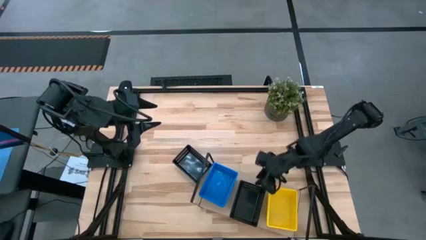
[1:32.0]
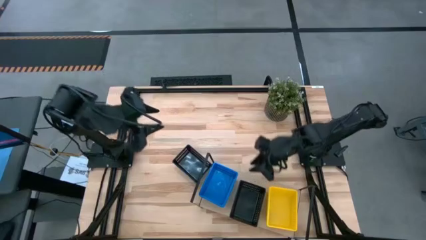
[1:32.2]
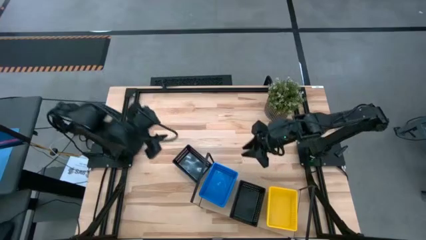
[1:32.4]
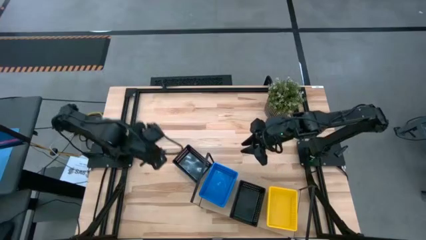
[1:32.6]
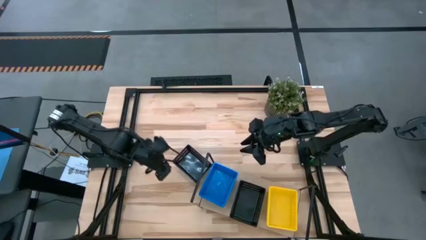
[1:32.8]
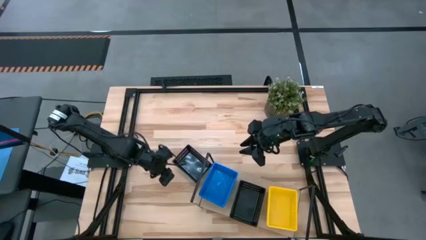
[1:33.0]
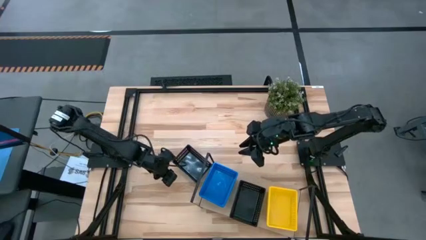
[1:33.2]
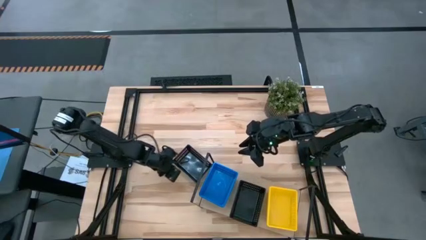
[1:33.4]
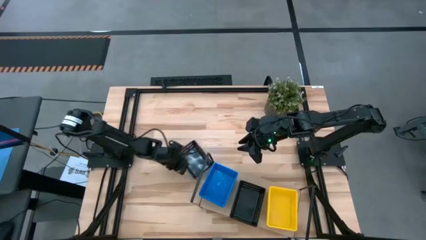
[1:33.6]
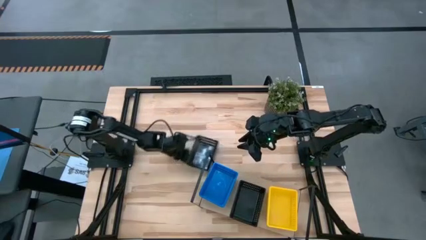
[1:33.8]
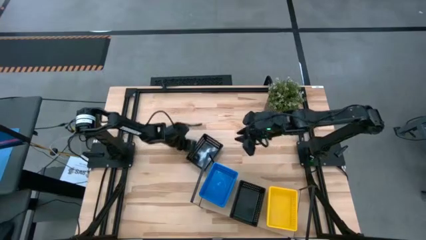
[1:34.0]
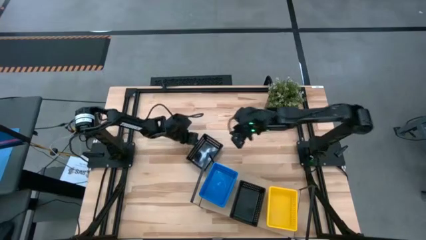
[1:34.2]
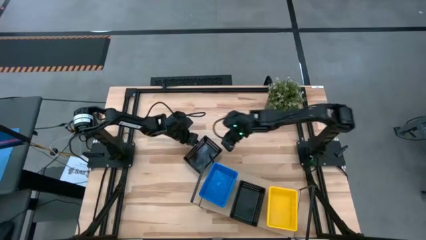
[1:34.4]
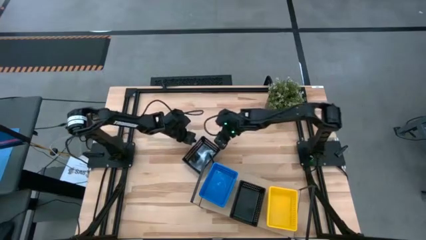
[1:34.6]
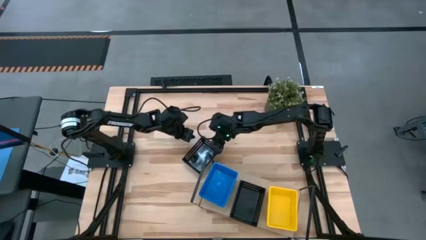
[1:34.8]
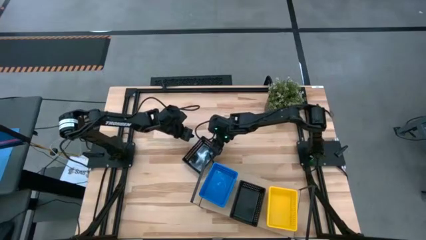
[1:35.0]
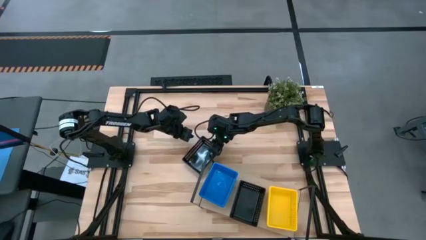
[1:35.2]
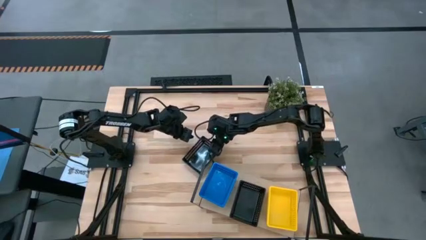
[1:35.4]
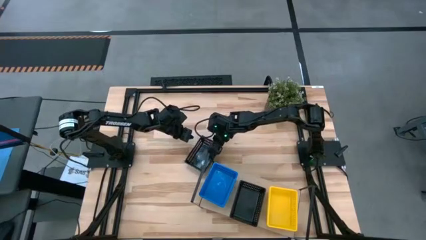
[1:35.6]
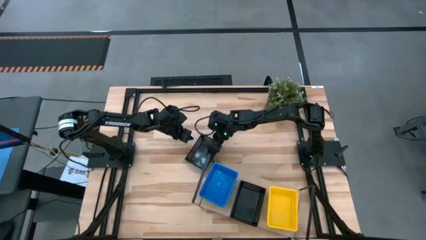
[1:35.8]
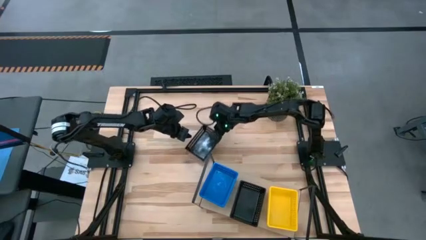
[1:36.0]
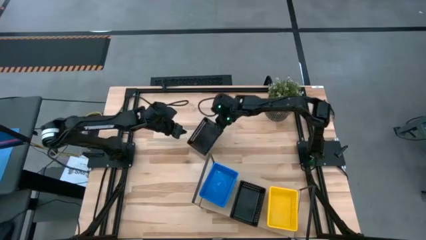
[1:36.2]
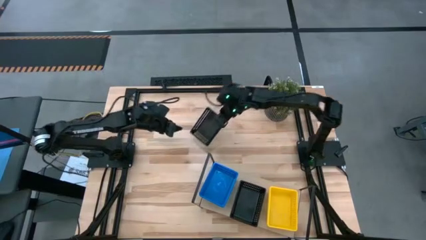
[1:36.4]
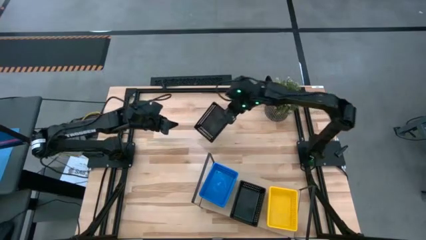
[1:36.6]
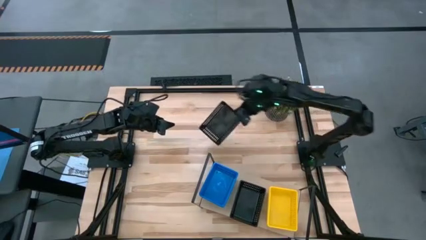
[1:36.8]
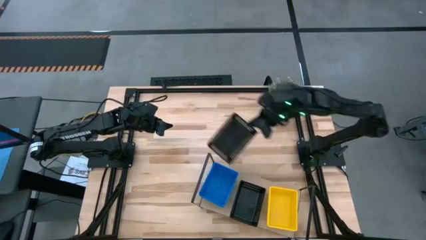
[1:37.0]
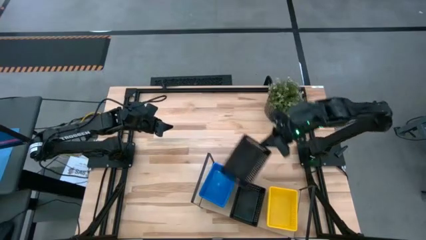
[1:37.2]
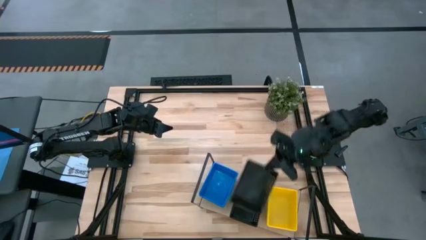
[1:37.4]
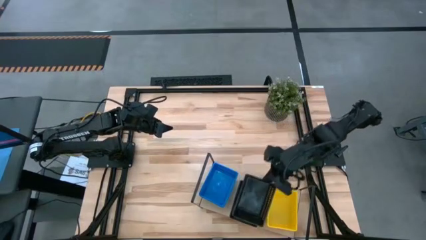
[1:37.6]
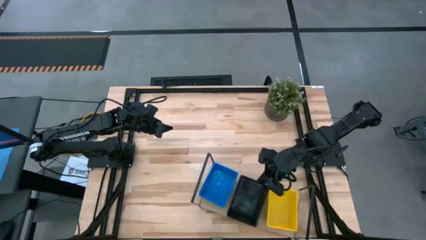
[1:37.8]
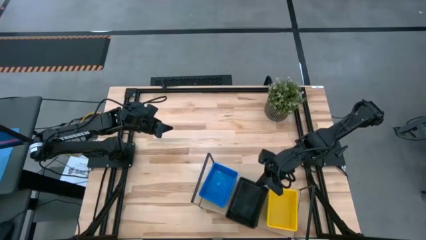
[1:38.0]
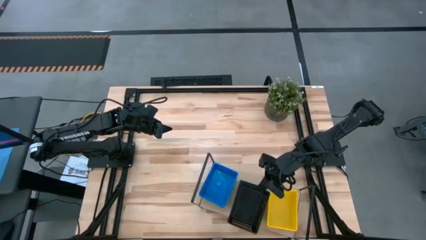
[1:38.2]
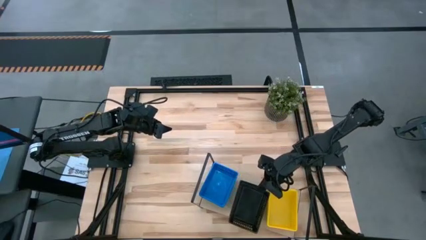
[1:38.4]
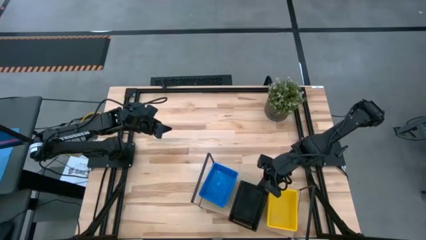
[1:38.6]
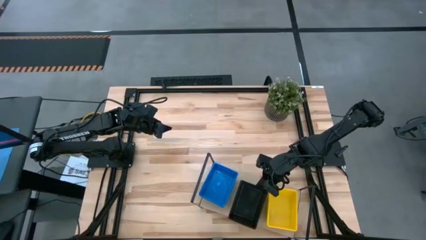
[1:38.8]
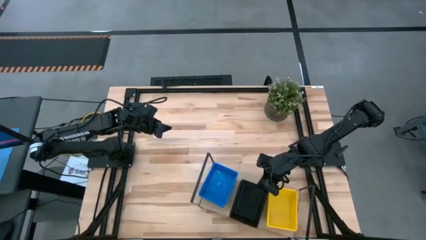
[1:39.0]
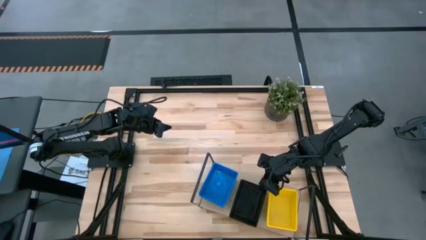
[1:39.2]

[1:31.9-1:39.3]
Task: Stack baskets on shelf by color
Stack the black bin on top of the black bin on the shelf

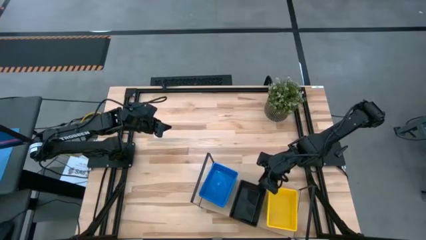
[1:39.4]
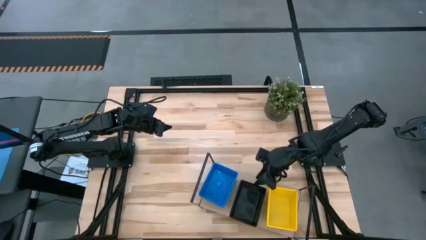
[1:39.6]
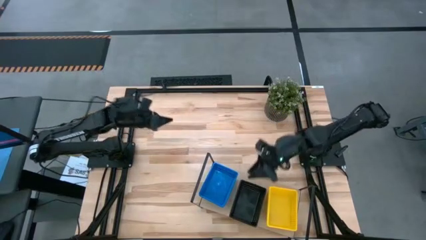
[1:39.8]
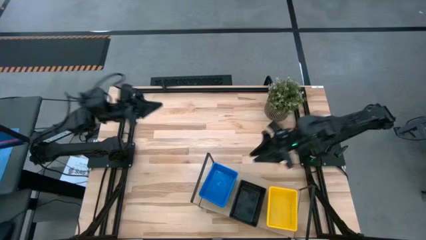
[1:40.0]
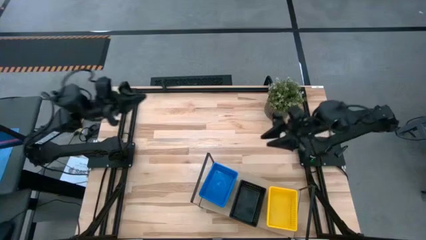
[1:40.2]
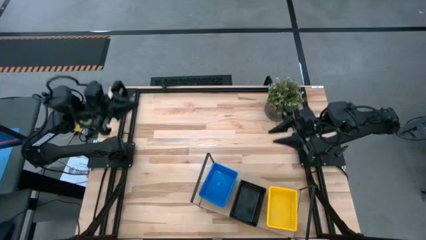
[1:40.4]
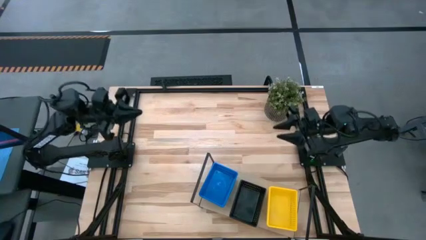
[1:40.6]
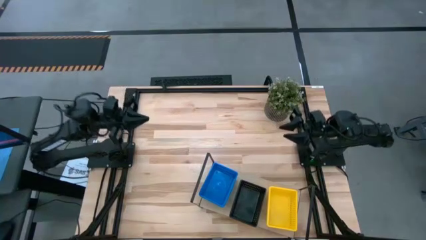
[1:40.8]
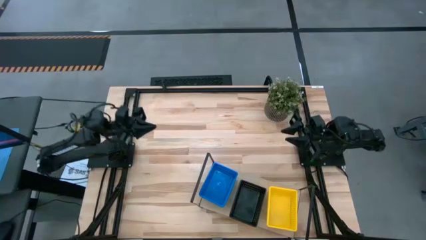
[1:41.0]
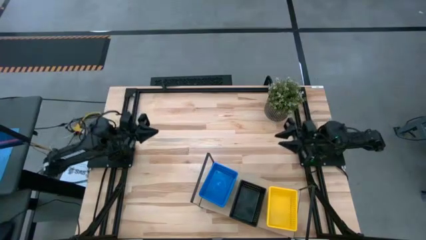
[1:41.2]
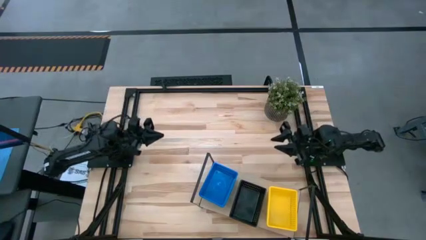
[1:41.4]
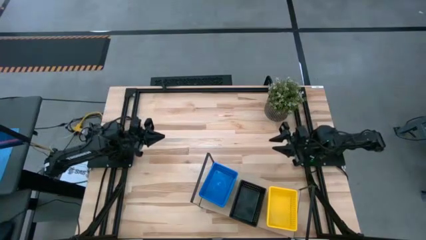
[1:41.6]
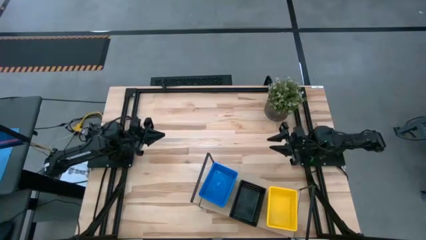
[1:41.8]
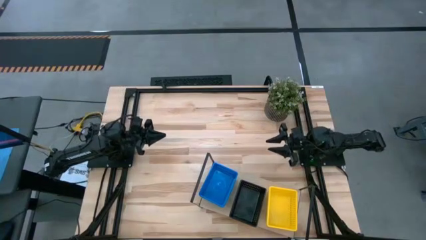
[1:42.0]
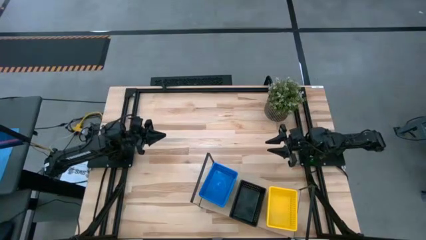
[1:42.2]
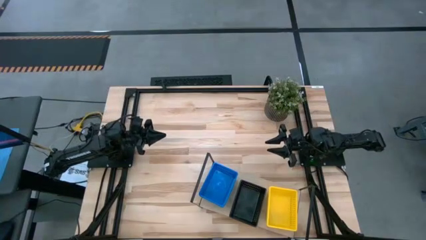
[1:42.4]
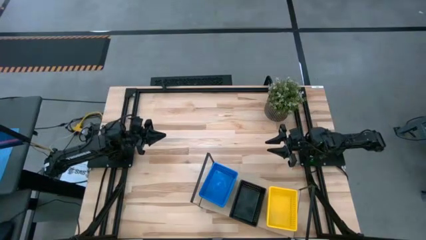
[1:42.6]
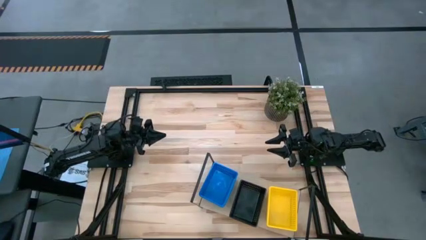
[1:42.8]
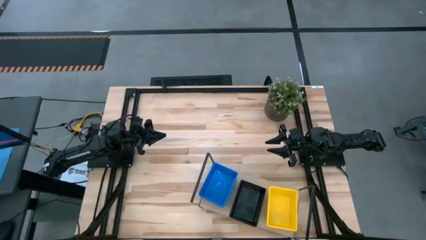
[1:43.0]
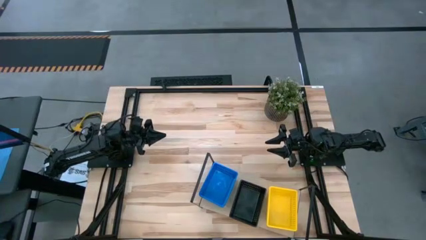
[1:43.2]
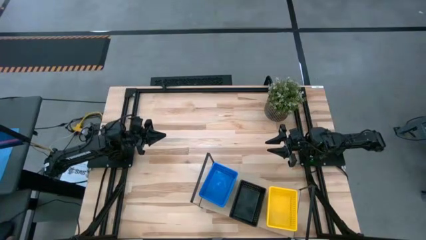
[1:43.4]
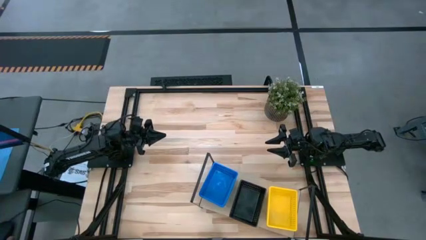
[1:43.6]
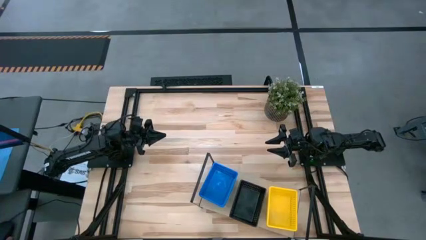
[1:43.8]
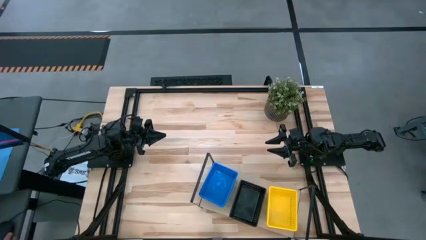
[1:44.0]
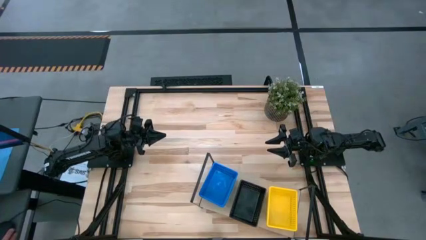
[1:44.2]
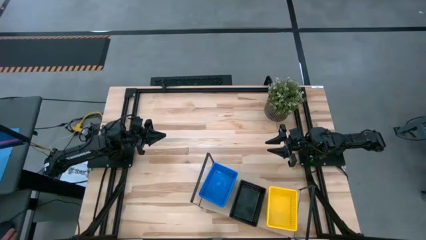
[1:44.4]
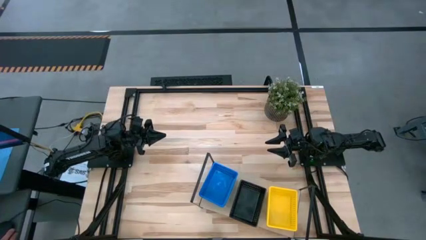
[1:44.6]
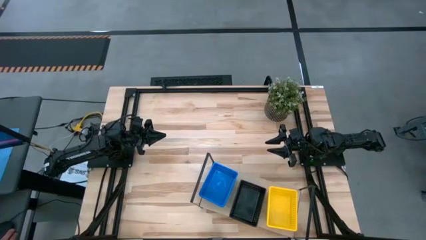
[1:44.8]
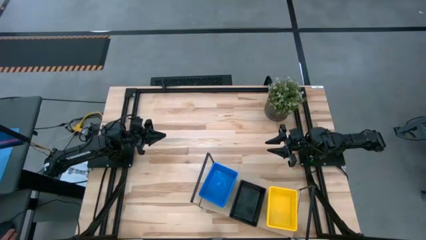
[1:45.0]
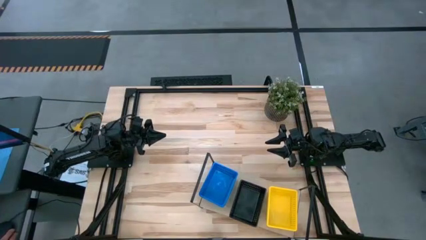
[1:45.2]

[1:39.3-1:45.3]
Return to Home Position

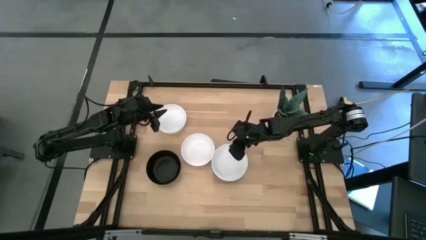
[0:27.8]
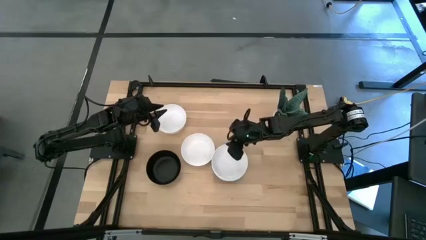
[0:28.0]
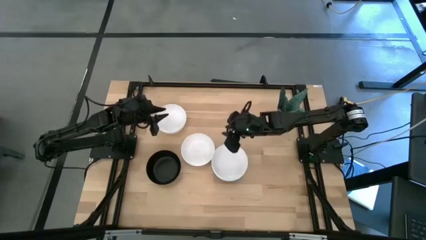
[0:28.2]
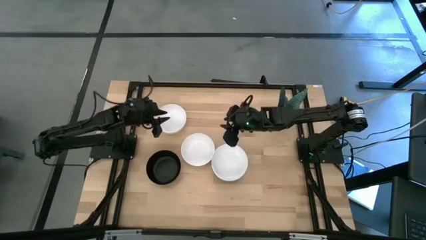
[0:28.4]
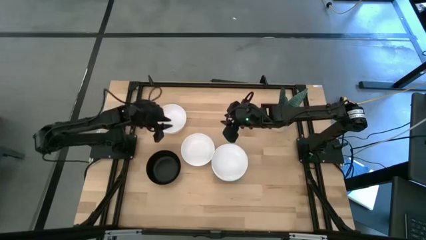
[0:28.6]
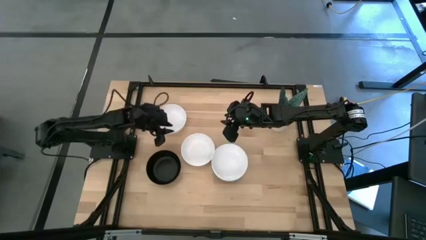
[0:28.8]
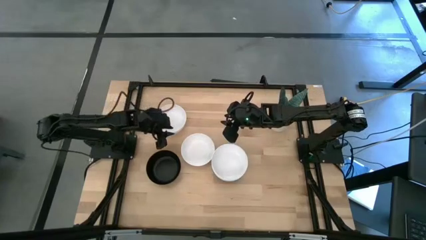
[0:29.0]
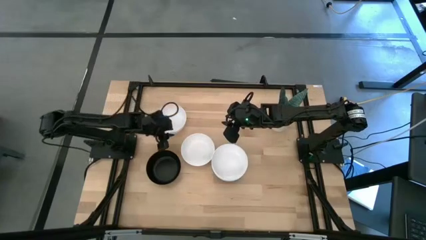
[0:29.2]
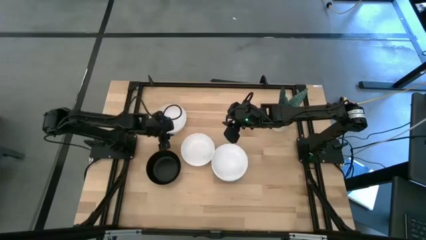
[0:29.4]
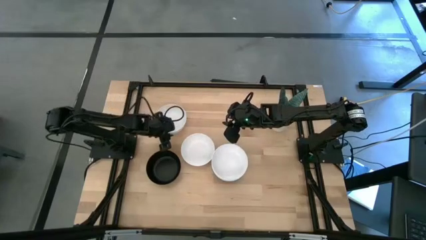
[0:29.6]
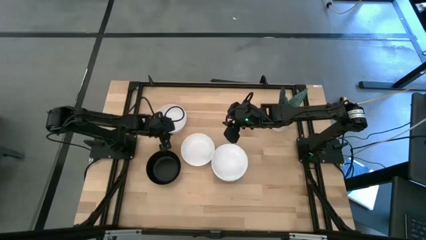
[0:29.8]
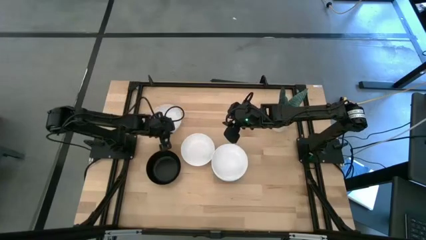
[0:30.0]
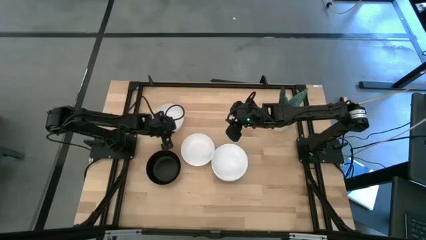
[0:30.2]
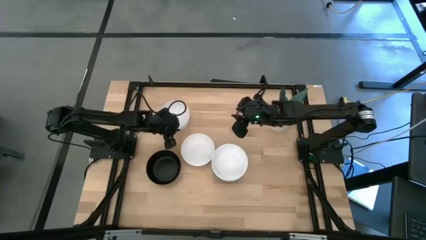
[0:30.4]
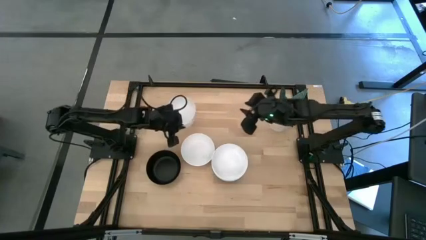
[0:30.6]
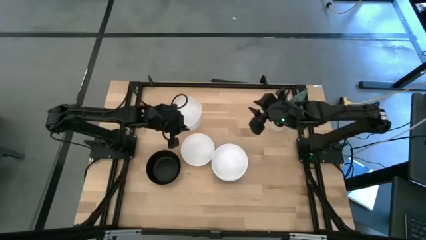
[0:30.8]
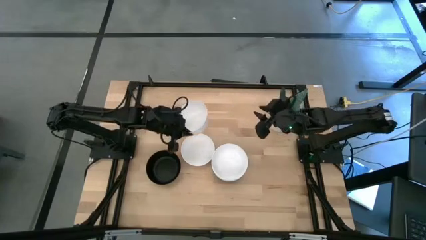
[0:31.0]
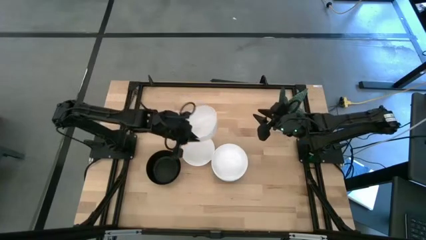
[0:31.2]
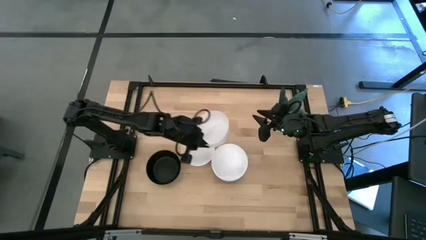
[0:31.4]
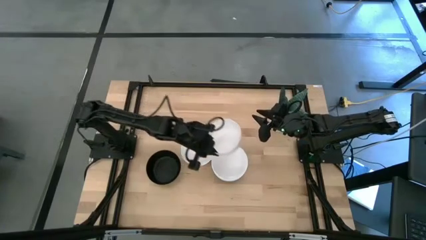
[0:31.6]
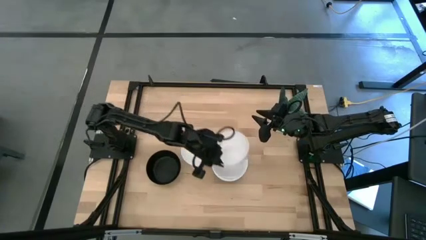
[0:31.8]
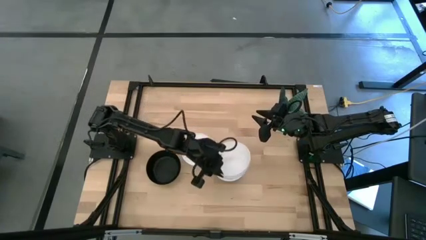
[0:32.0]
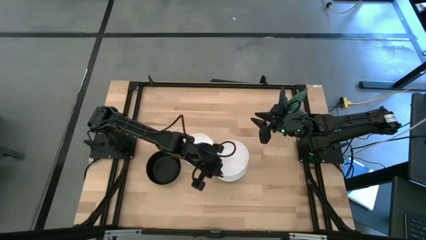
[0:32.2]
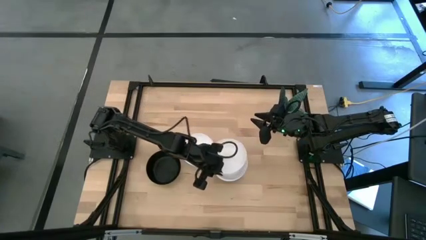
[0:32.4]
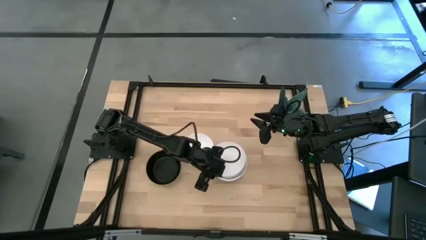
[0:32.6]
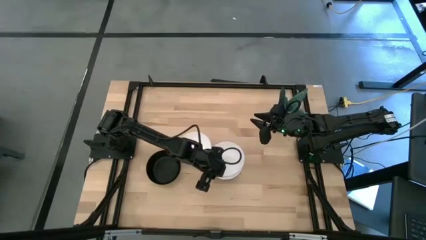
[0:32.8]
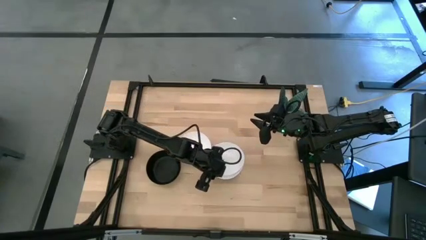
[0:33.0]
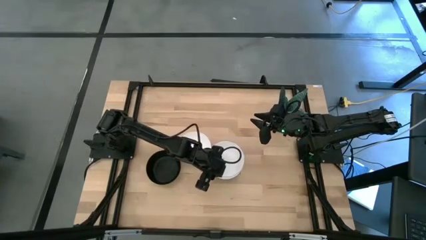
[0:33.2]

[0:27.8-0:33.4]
Task: Nest bowls inside each other
Stack the white bowl on top of the stacked bowls
